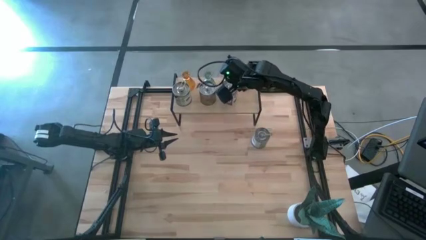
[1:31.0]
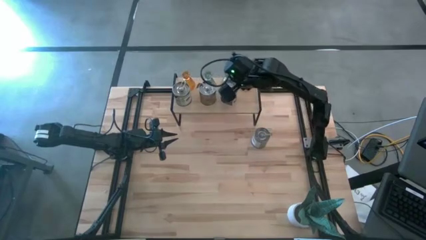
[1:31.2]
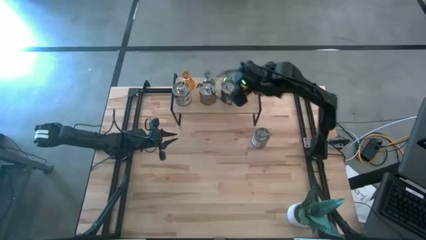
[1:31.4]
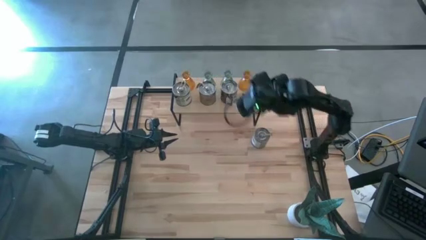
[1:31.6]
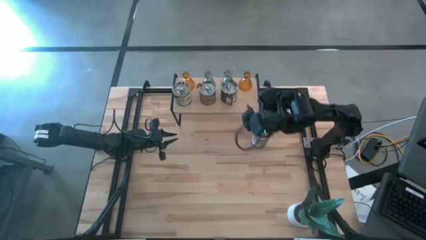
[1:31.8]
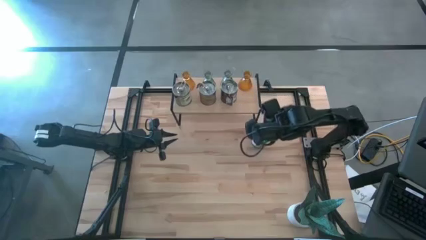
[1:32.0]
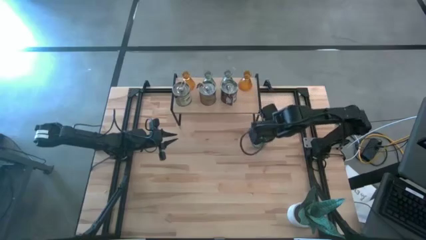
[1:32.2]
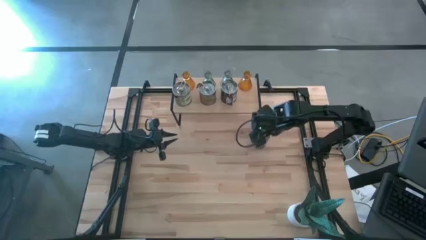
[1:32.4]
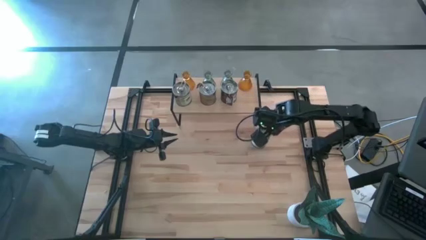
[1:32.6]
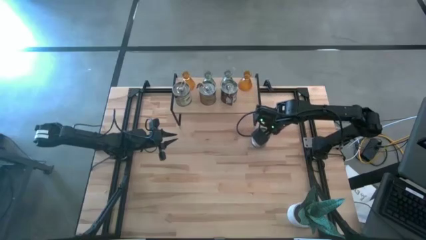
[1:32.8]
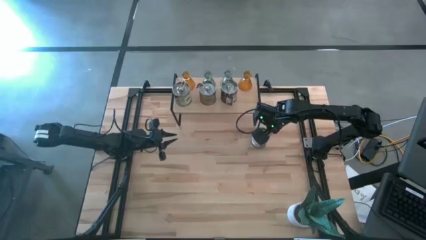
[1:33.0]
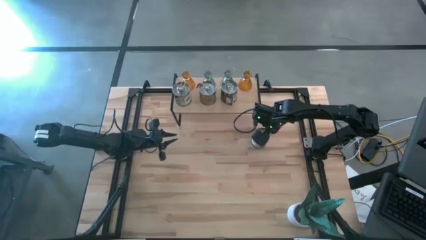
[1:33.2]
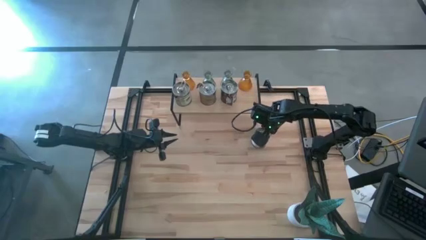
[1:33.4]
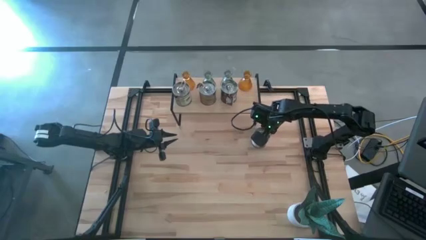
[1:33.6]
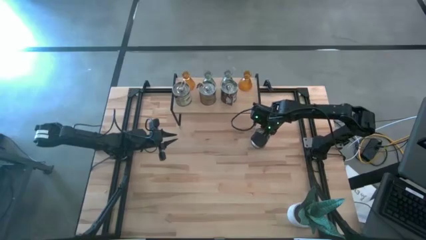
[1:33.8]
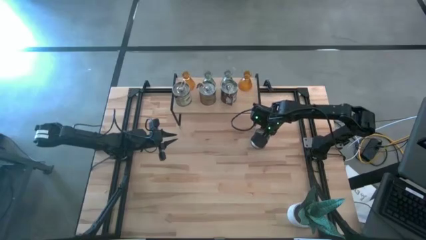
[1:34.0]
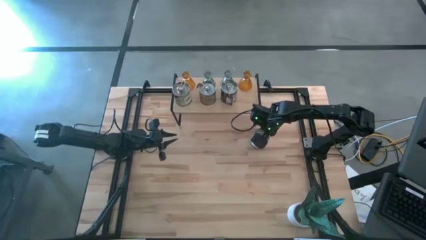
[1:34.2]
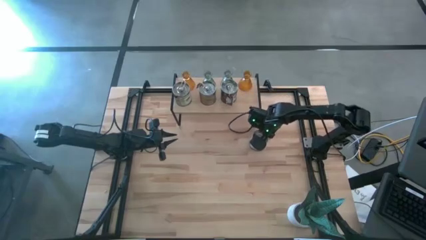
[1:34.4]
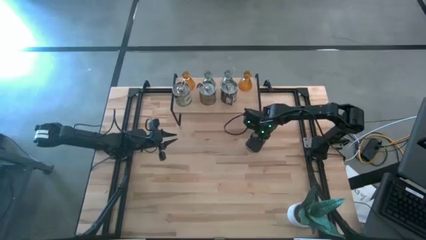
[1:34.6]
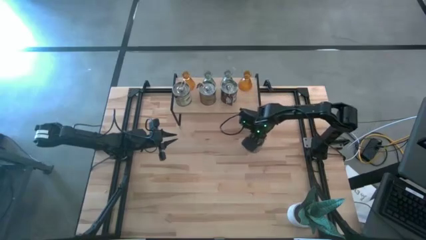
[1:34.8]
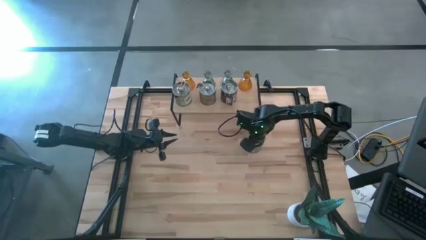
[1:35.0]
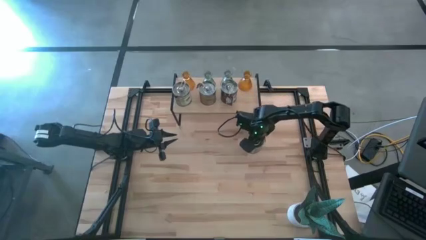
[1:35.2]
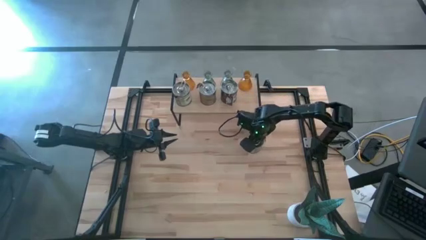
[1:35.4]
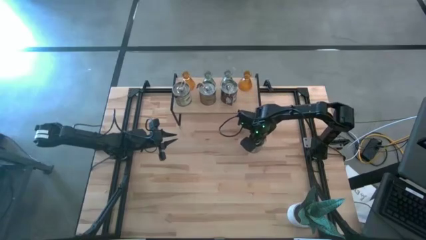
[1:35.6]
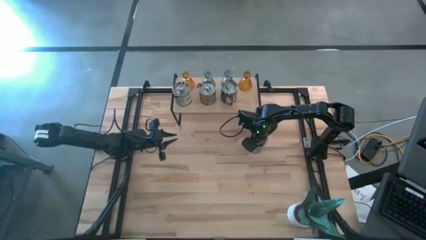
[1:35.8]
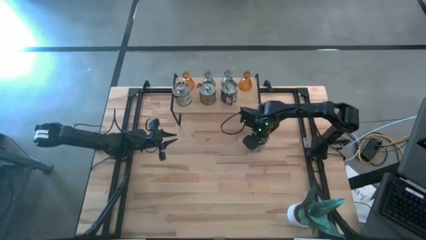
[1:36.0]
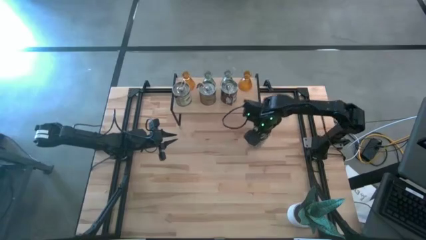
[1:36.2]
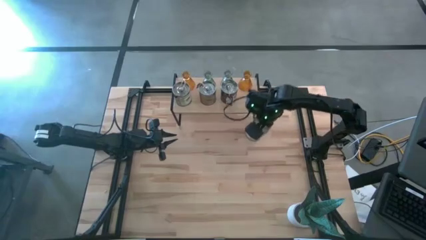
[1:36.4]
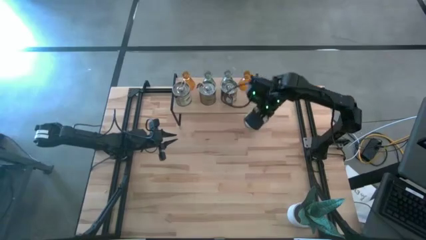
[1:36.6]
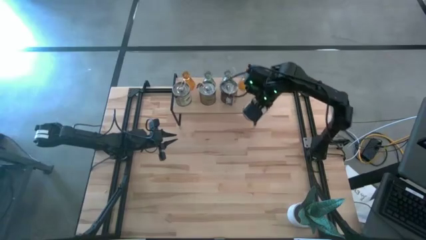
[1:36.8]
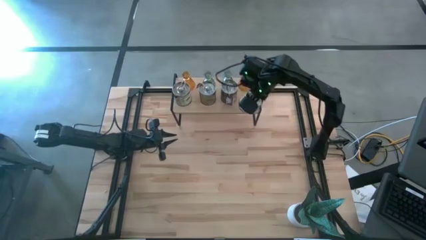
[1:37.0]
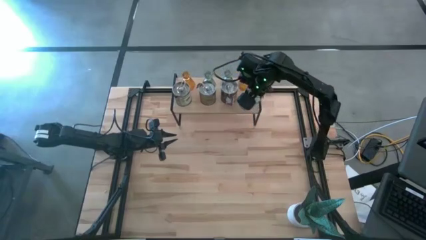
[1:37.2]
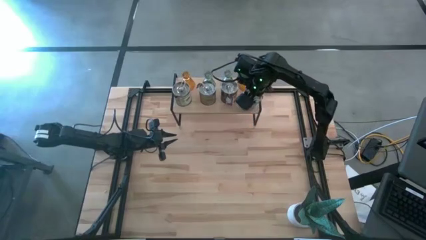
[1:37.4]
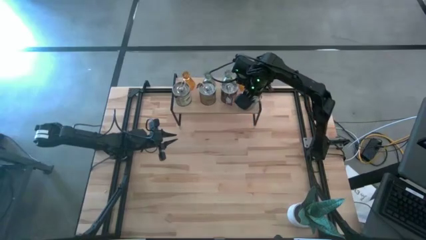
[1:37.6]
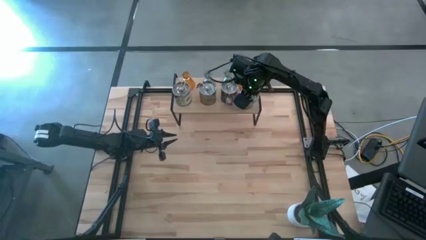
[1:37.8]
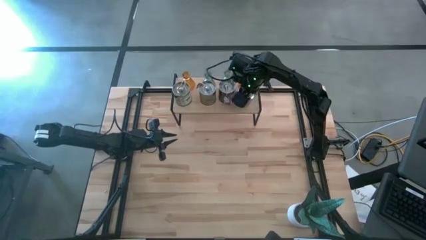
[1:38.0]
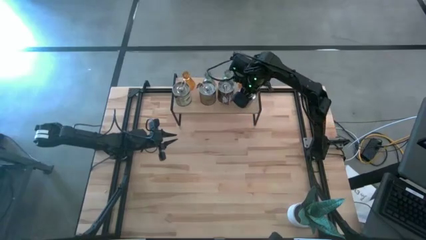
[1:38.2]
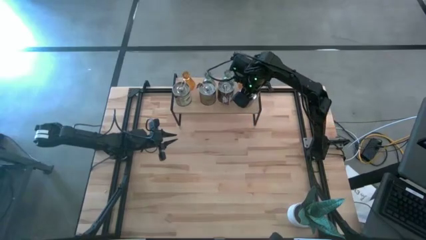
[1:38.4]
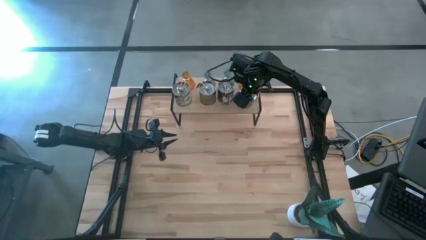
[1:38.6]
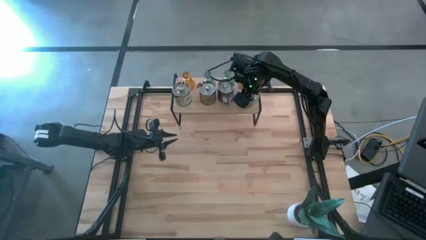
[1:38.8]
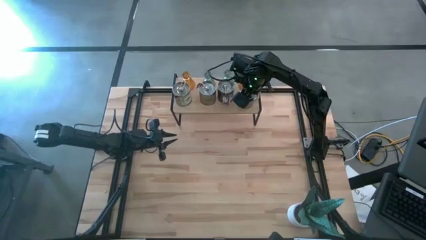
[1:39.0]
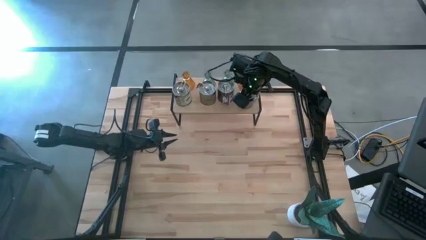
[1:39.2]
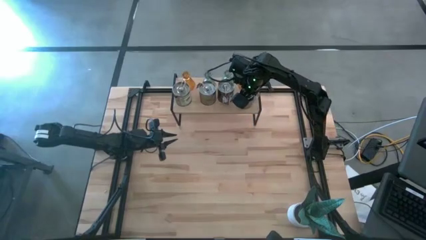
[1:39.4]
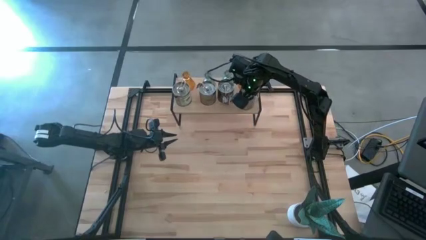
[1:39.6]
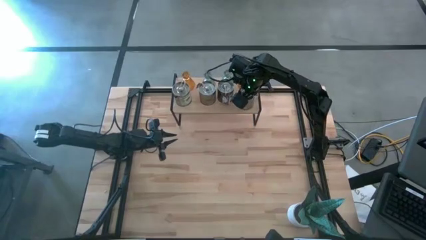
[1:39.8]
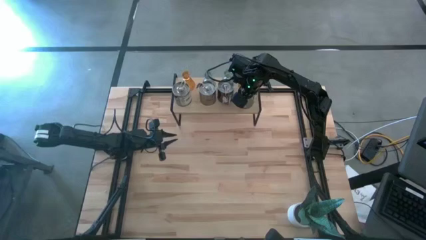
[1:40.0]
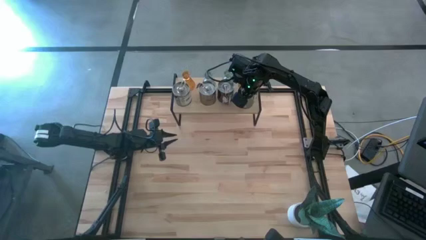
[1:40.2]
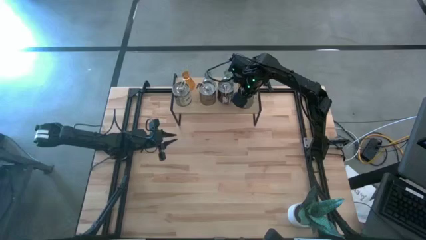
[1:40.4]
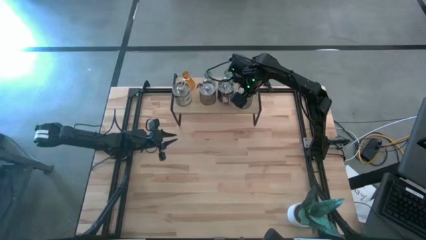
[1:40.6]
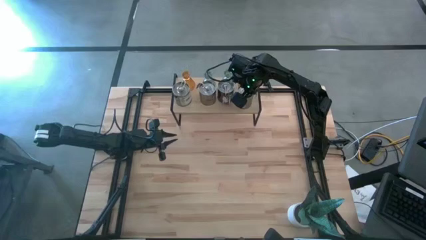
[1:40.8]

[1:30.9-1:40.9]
Task: Pick & Place candle stick holders
Put the jar candle on the shelf aligned with the other jar candles

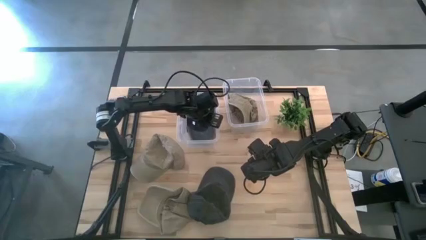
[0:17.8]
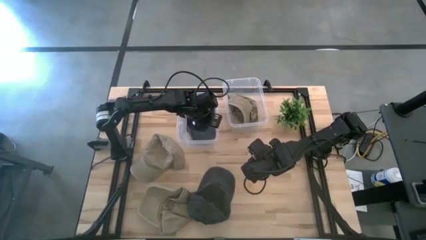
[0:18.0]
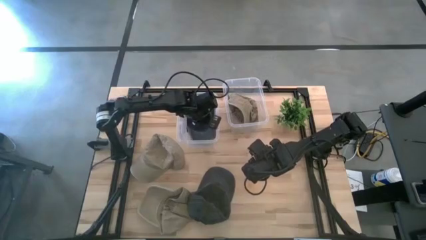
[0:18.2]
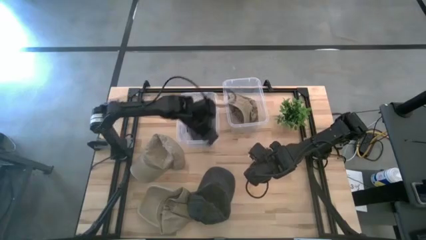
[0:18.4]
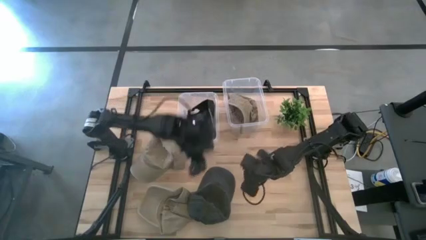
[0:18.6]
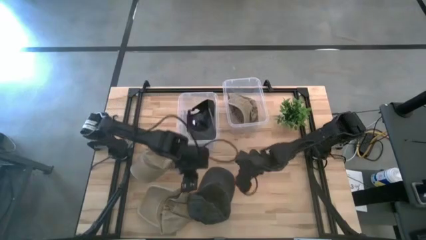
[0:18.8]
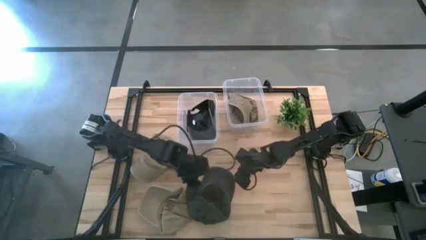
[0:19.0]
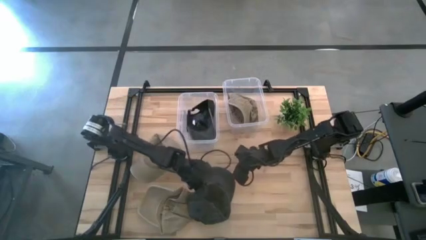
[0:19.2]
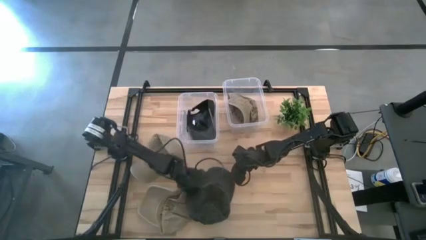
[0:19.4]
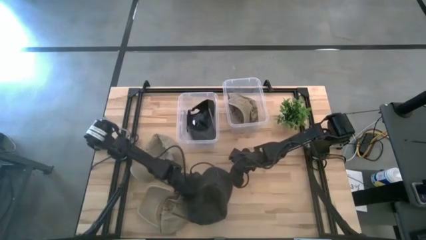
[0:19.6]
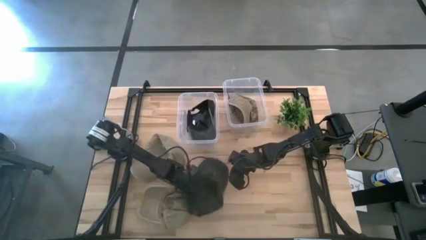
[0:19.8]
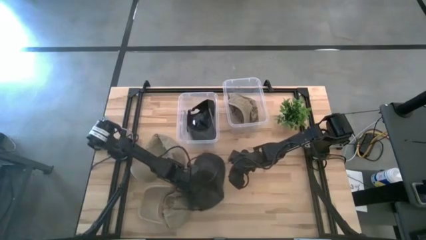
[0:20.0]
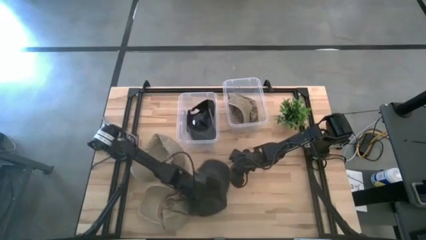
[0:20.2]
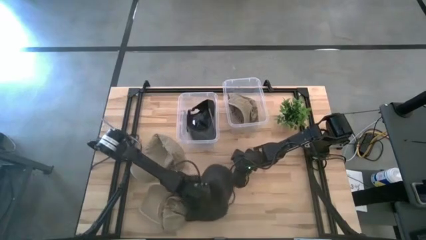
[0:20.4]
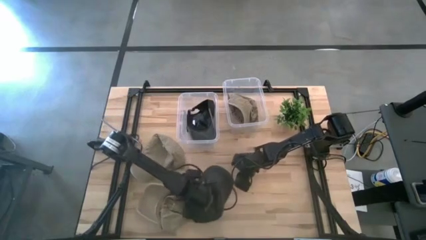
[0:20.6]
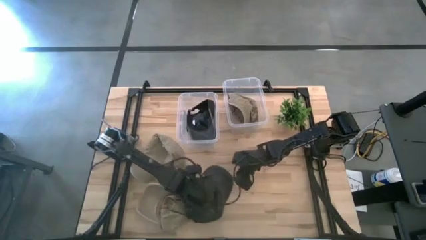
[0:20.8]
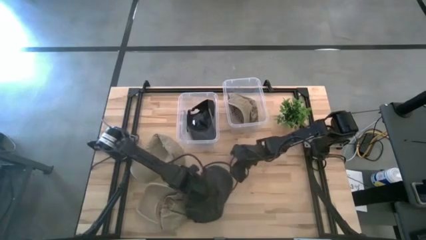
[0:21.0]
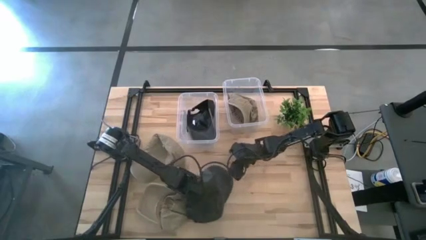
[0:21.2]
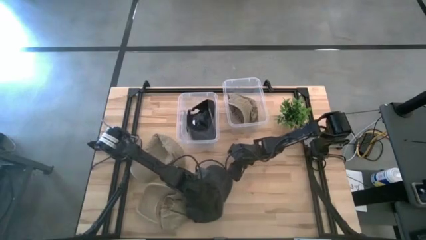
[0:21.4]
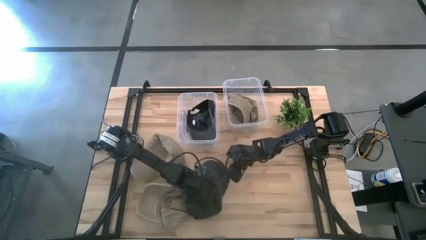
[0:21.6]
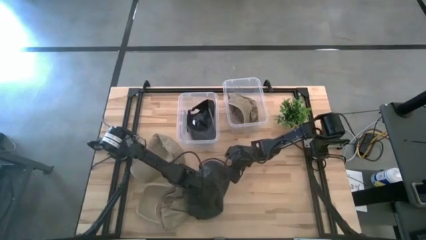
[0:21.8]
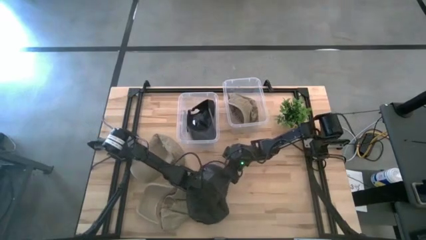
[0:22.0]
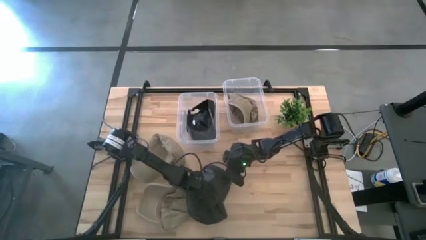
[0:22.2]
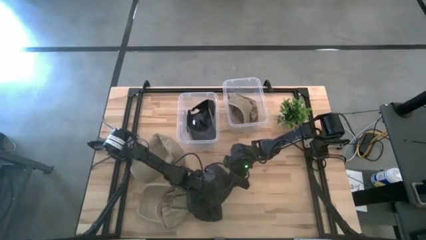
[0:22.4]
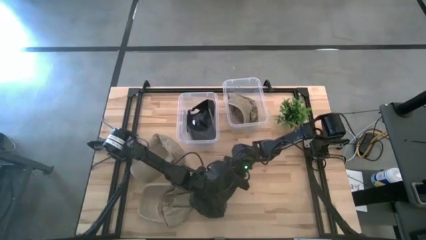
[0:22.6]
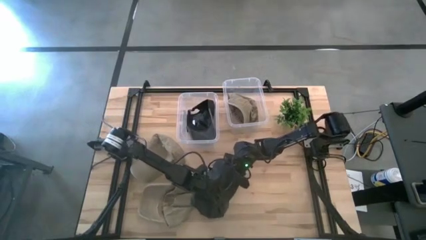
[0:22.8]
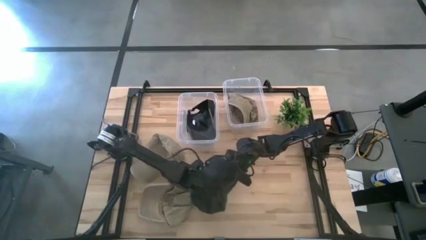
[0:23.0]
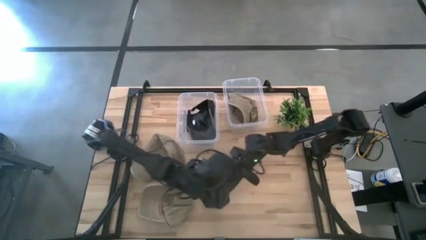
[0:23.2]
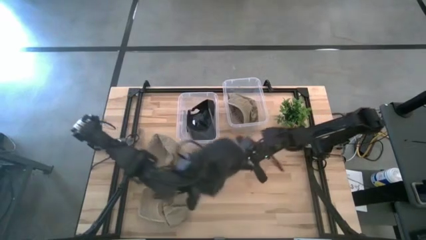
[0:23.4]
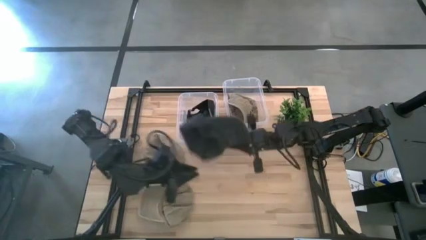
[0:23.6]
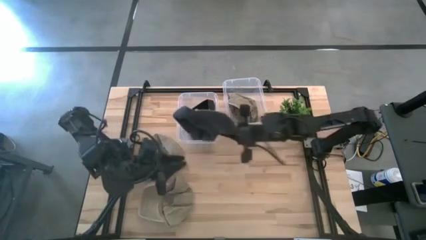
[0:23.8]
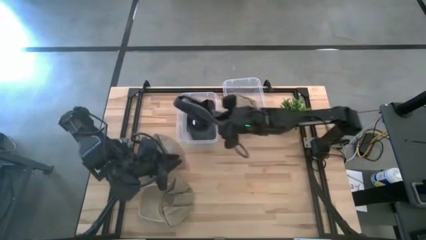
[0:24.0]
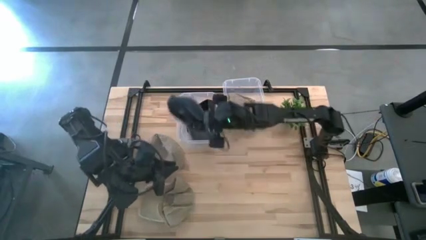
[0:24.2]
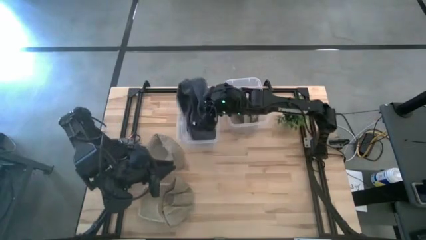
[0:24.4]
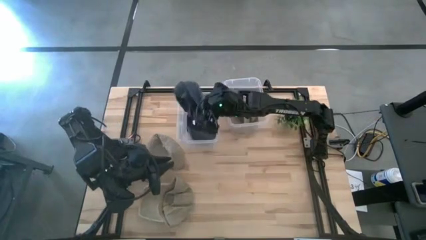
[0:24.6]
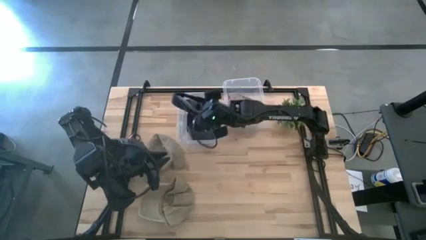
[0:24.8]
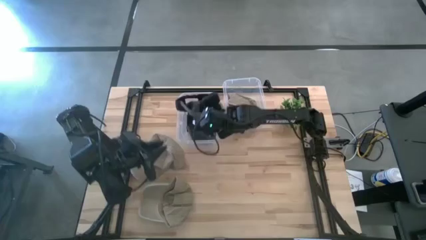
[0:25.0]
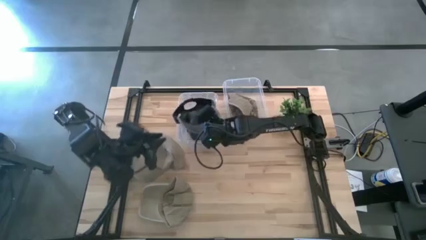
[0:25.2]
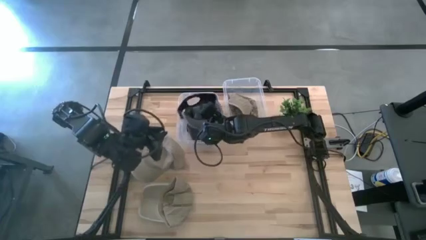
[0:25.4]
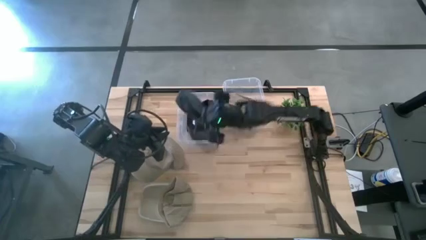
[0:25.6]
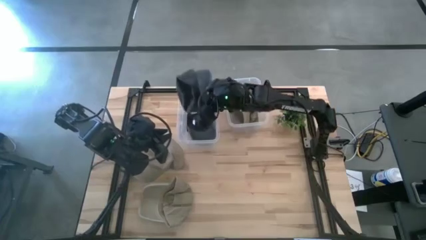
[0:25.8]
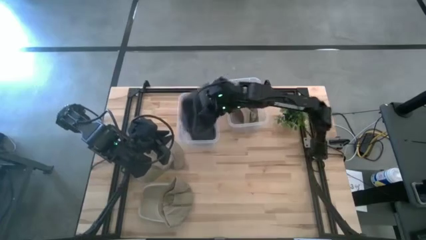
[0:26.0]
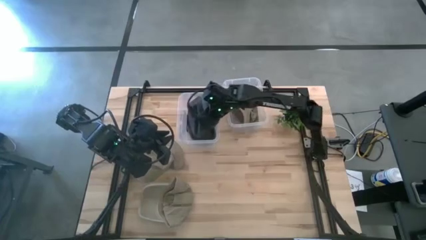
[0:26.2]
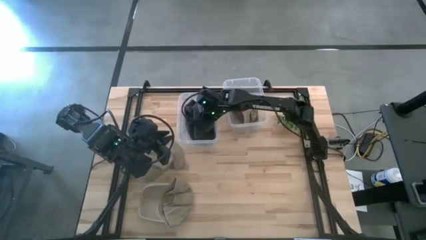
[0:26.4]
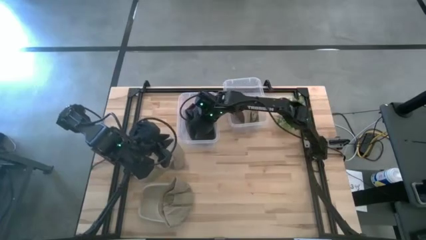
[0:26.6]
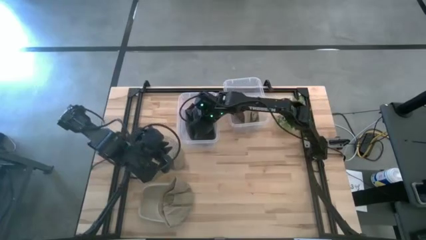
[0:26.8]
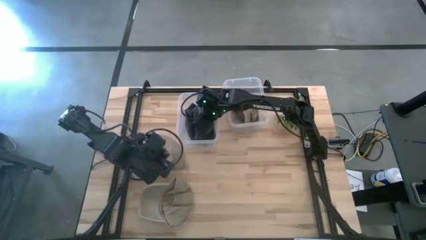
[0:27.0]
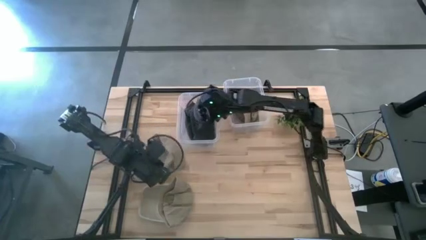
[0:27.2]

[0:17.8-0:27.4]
Task: Pick & Place hat
Put the black hat into the left transparent bin
